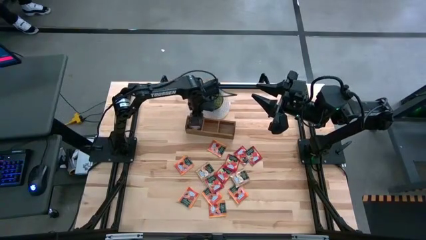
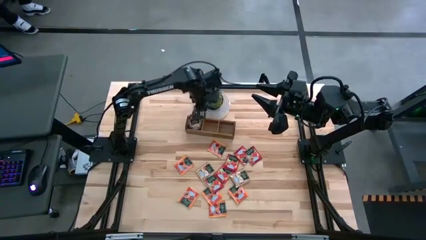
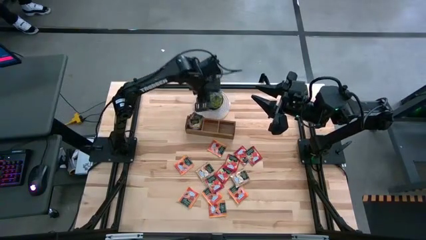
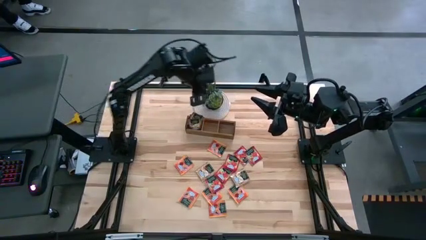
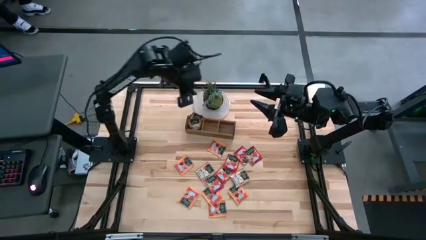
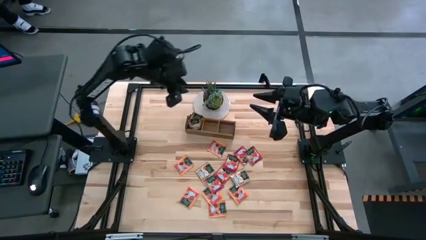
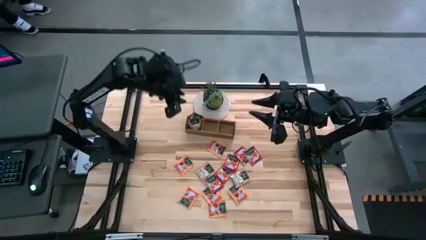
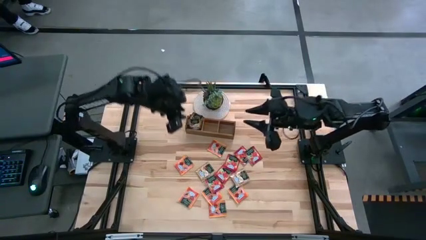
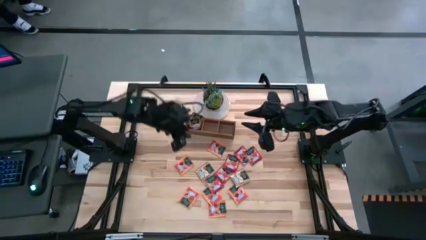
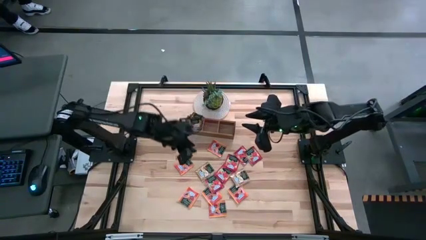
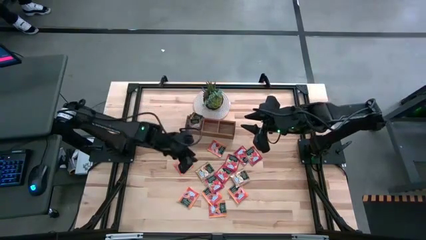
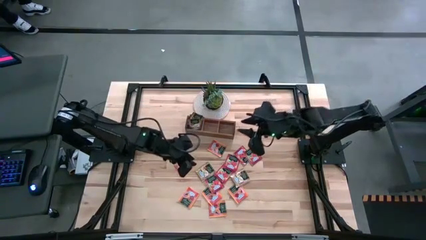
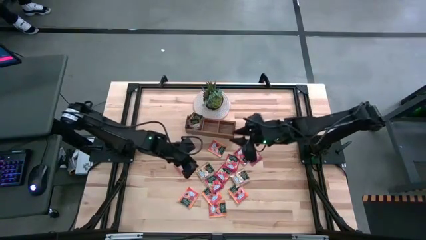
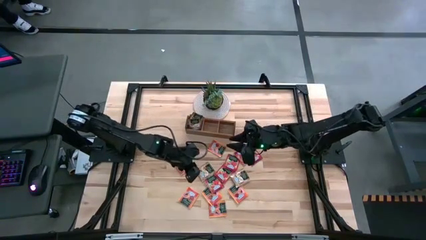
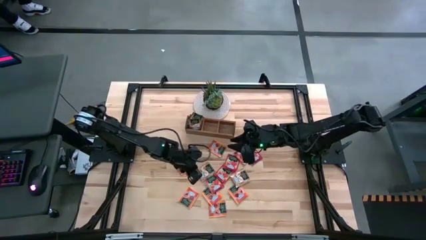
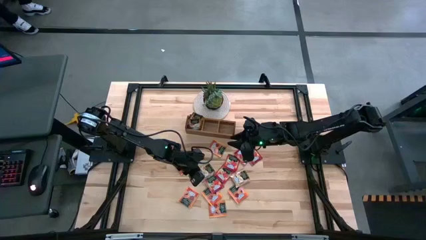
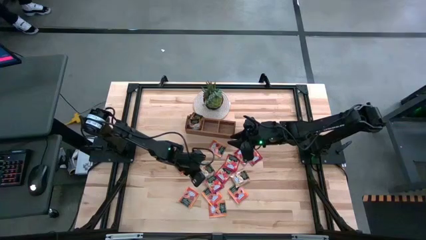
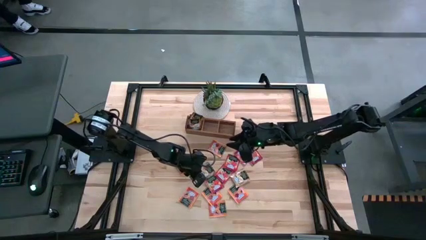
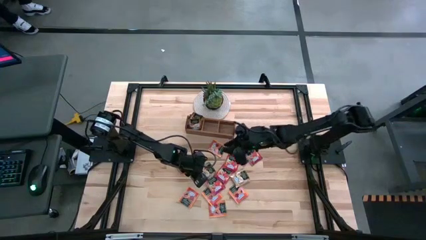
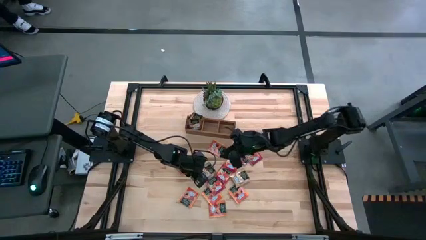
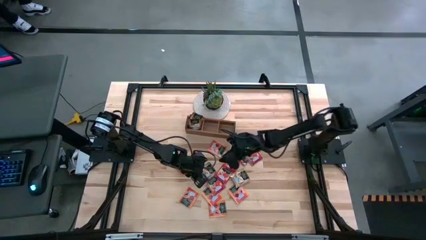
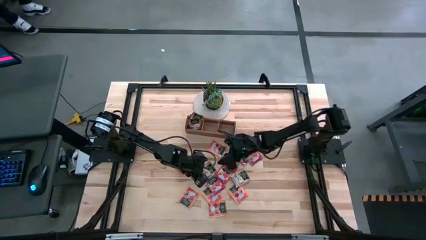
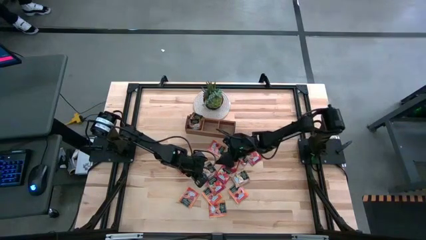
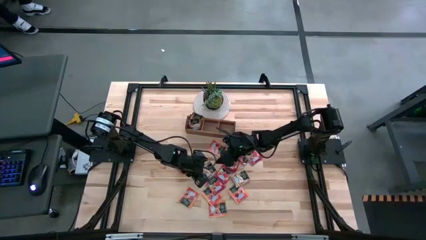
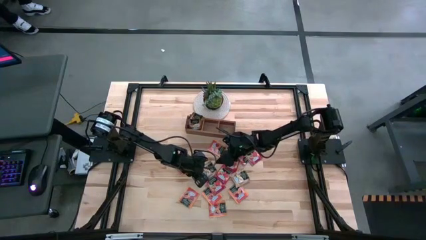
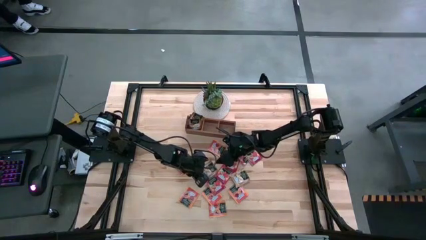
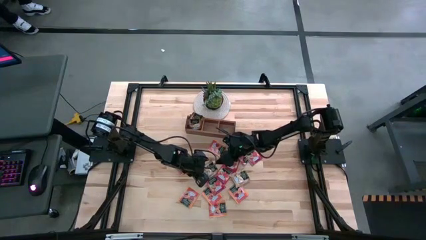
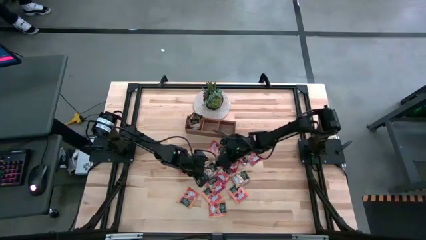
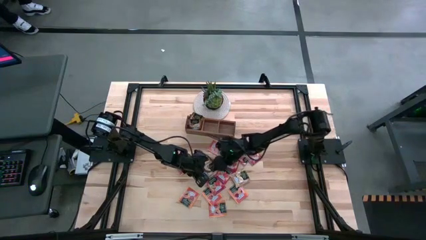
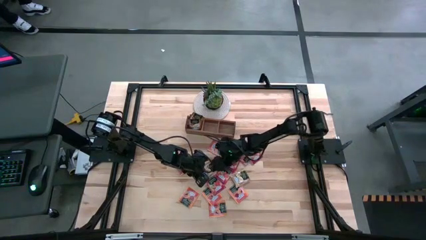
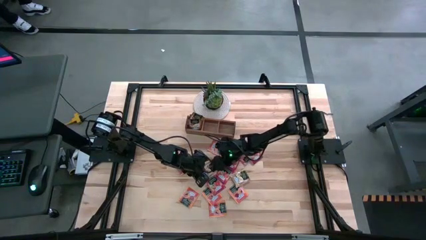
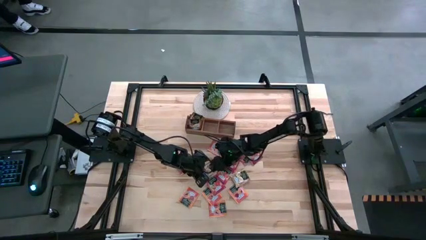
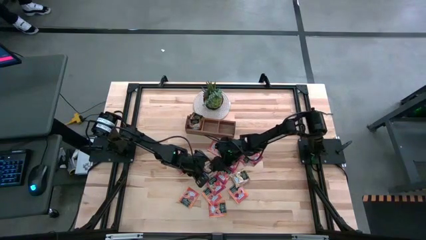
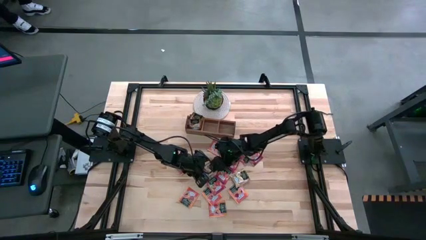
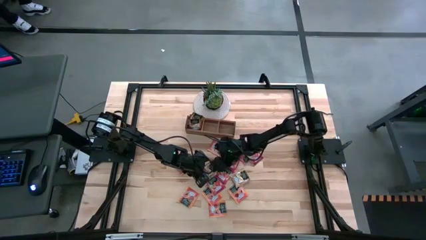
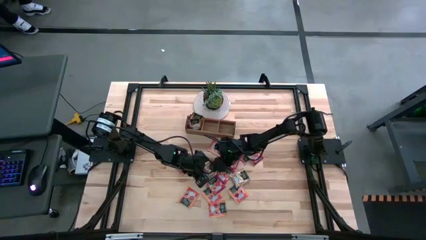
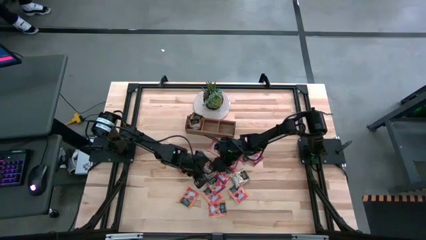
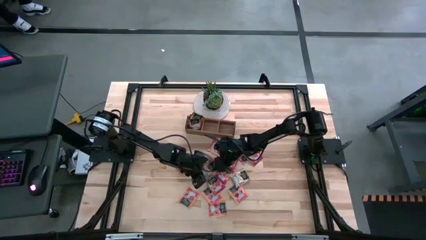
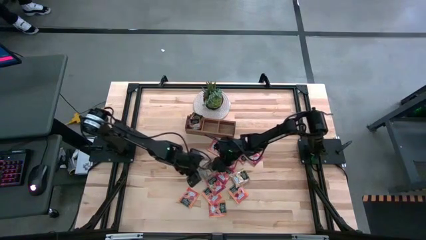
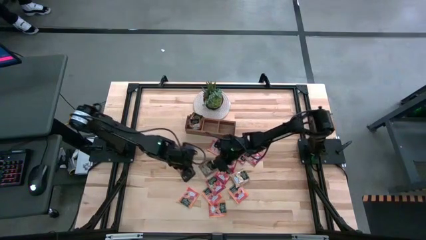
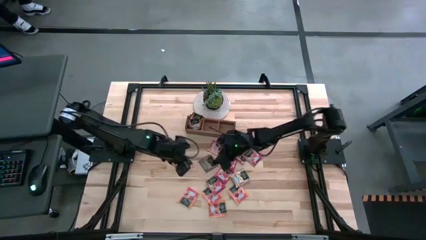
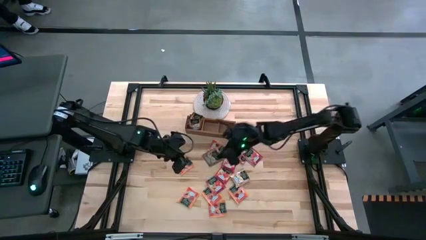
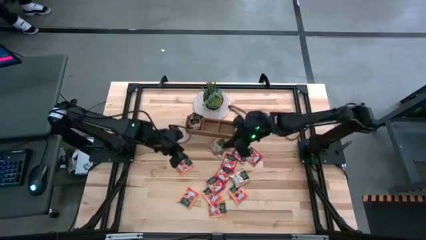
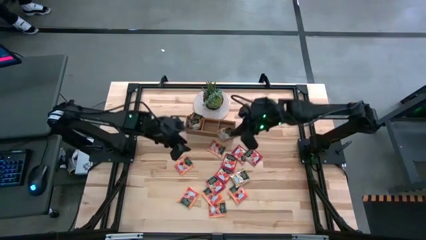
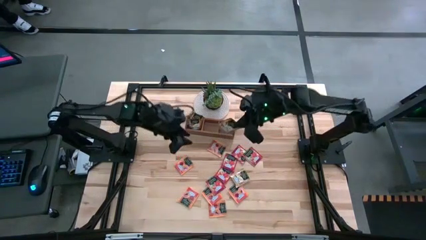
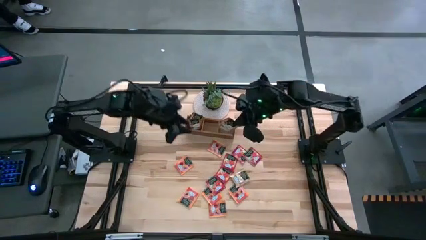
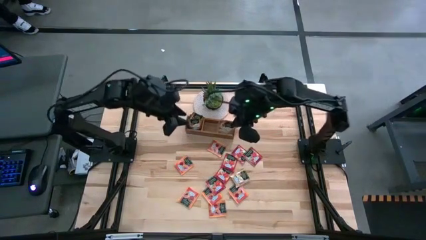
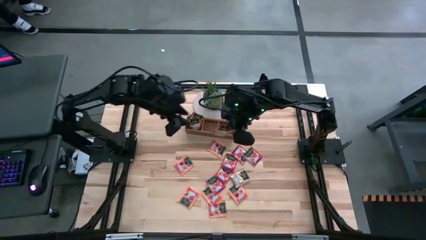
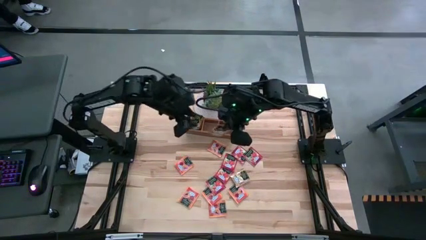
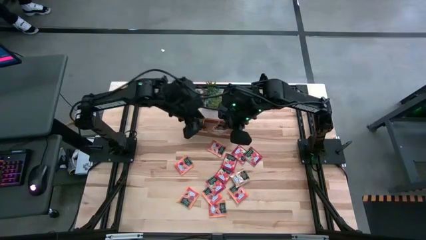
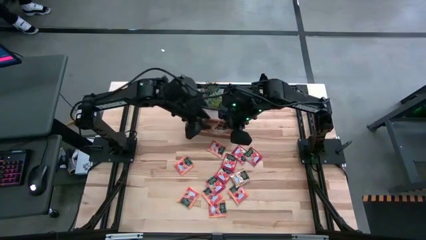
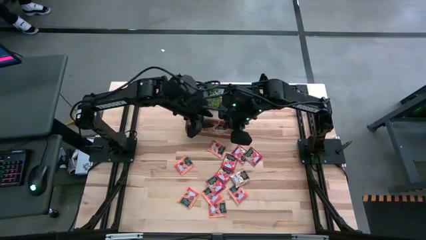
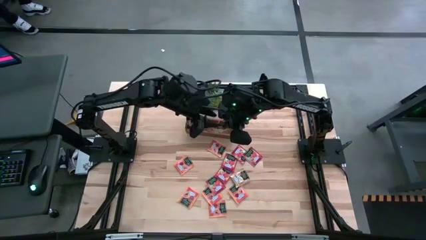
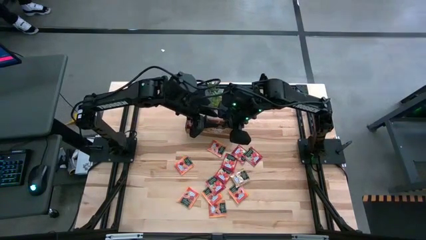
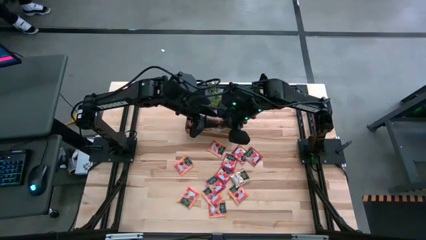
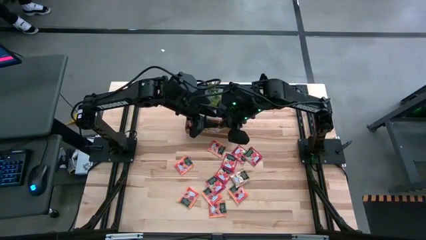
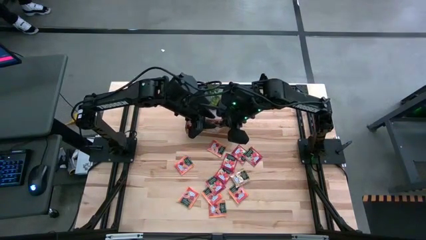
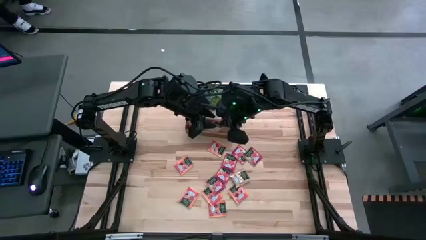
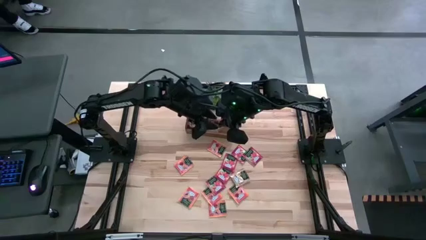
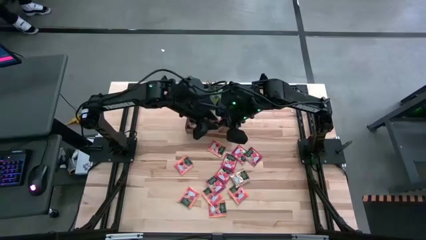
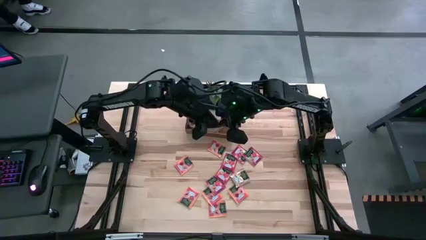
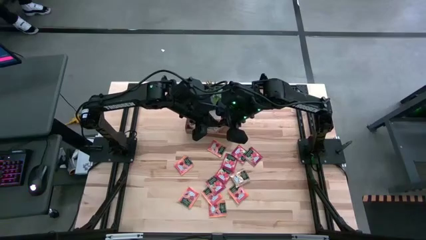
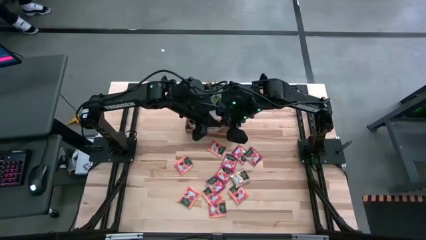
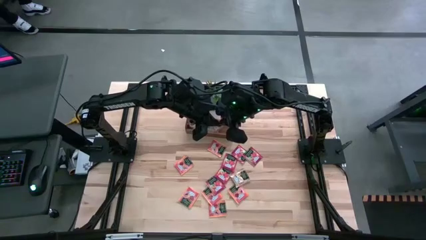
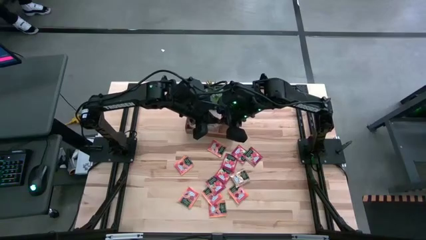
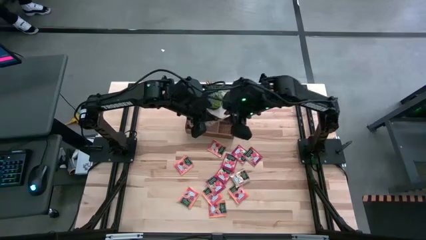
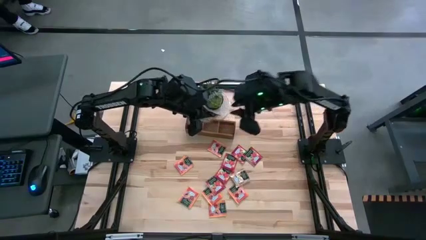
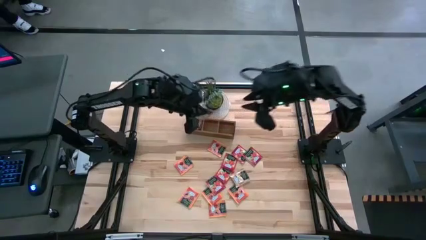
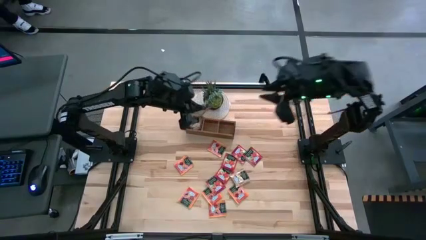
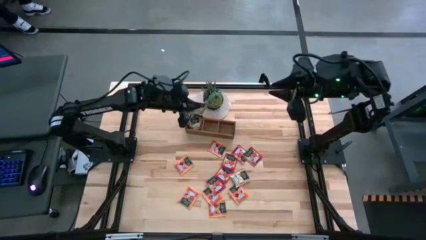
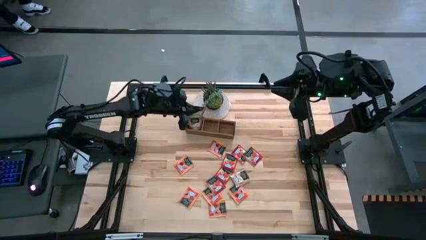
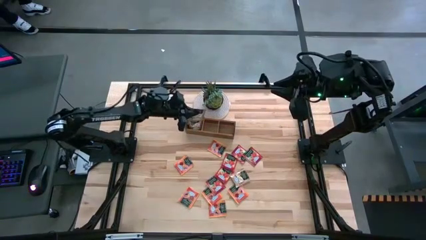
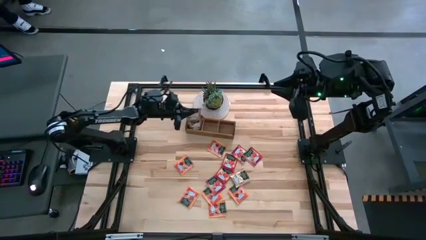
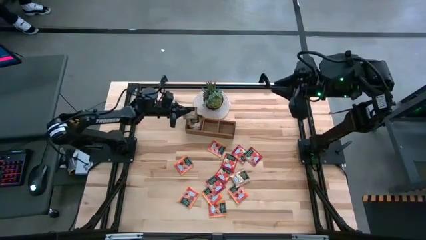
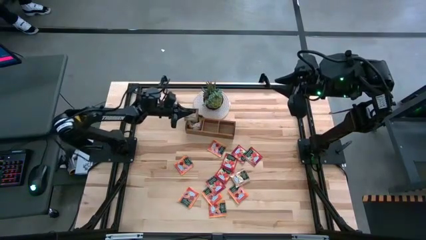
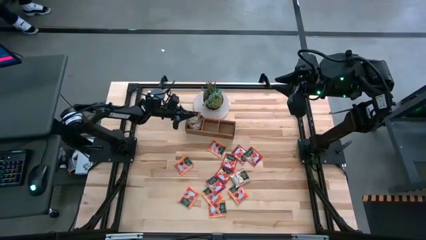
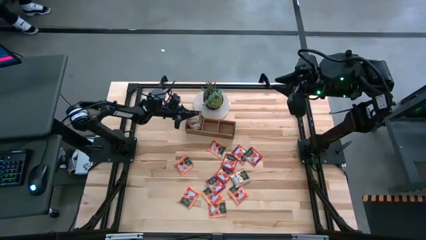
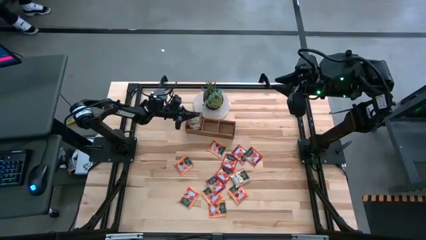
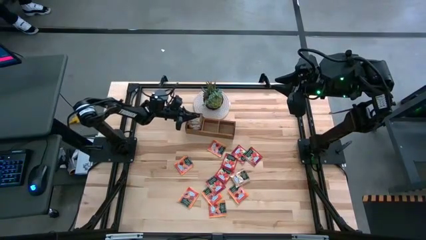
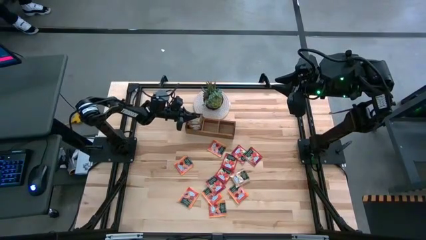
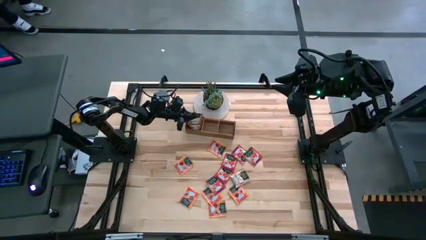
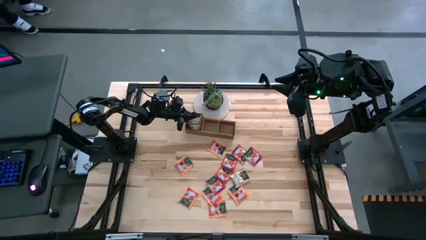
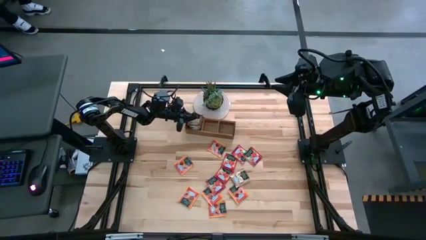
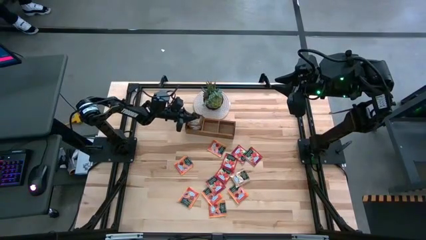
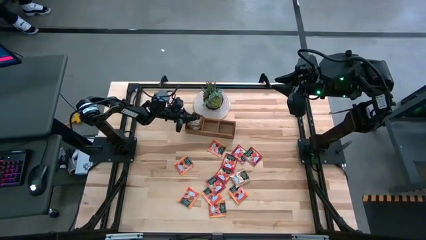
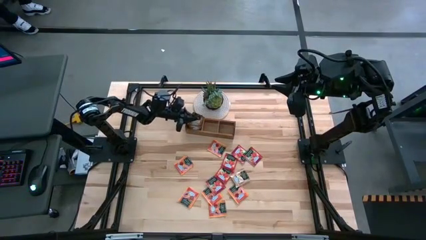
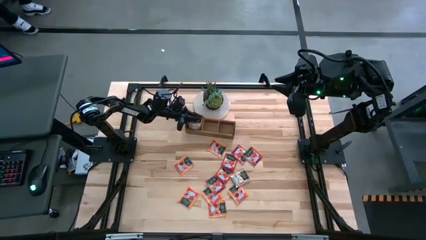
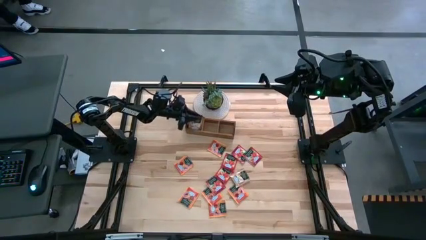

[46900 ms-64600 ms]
Task: Pick & Place Tea
Put the left brown tea bag into the left section of the wooden organizer
